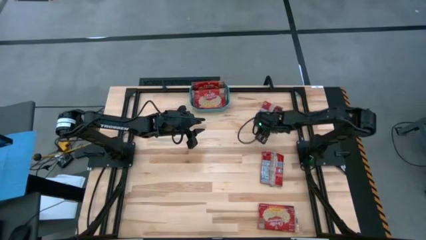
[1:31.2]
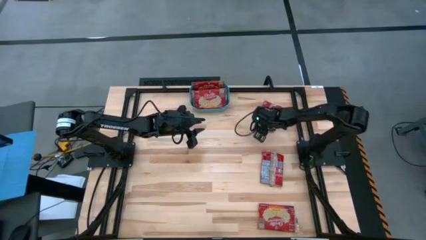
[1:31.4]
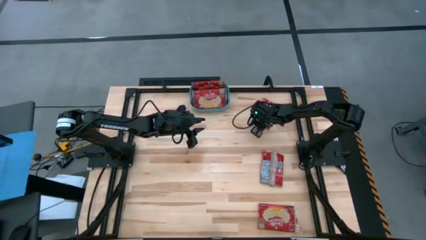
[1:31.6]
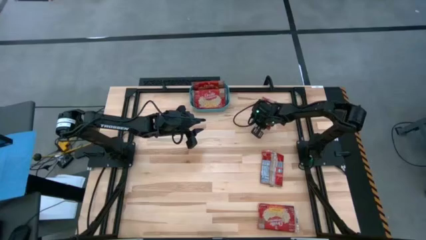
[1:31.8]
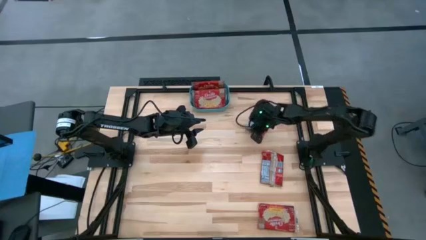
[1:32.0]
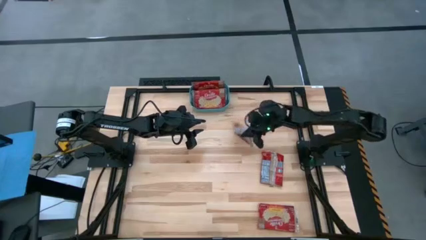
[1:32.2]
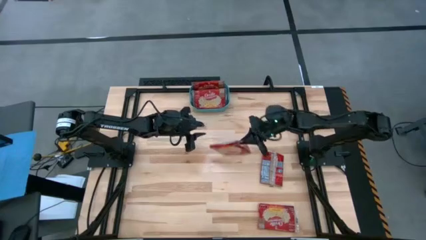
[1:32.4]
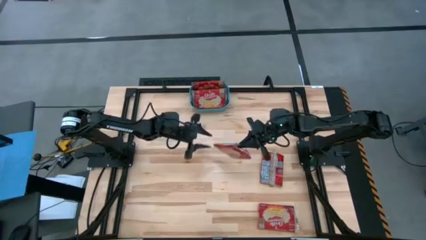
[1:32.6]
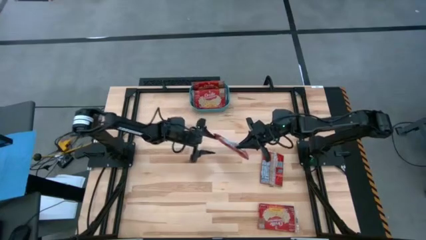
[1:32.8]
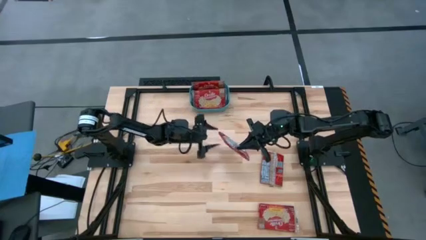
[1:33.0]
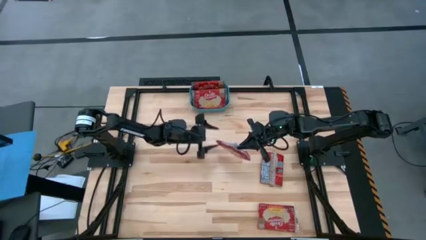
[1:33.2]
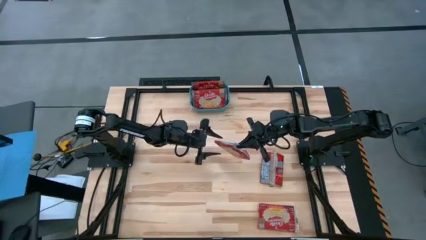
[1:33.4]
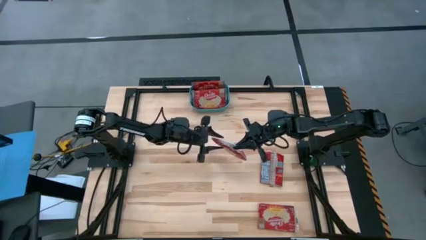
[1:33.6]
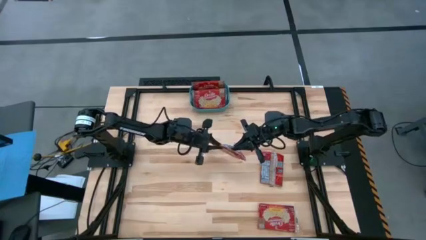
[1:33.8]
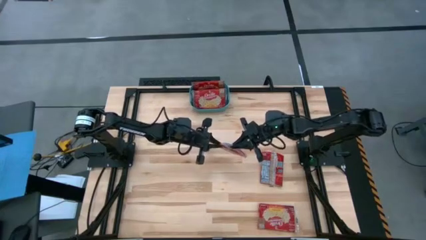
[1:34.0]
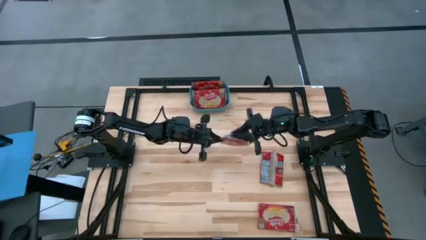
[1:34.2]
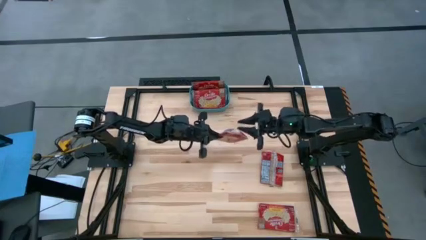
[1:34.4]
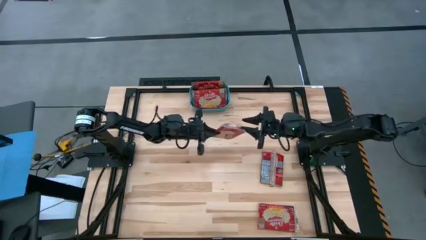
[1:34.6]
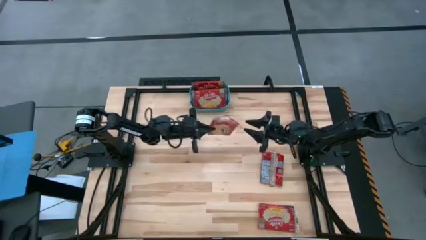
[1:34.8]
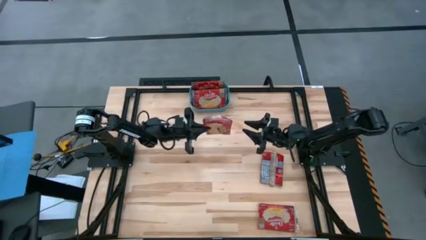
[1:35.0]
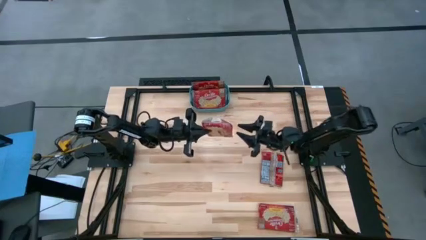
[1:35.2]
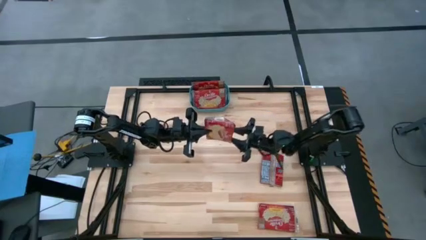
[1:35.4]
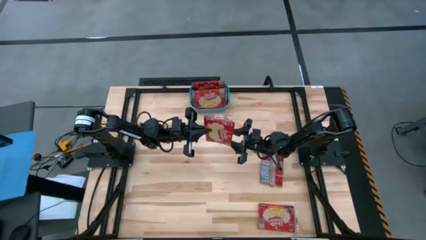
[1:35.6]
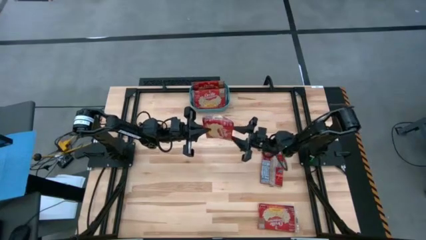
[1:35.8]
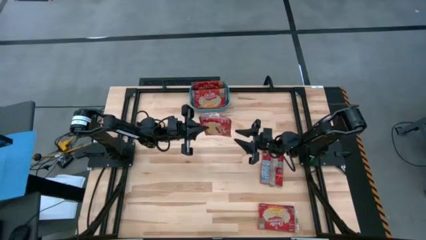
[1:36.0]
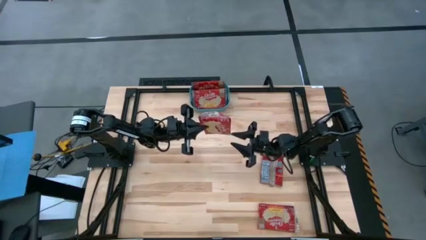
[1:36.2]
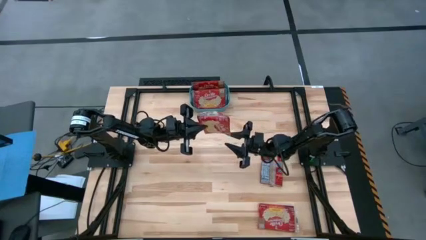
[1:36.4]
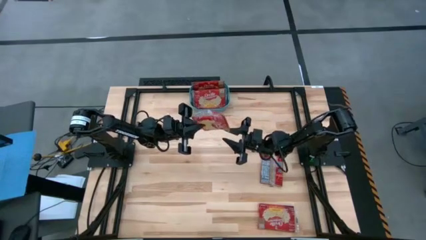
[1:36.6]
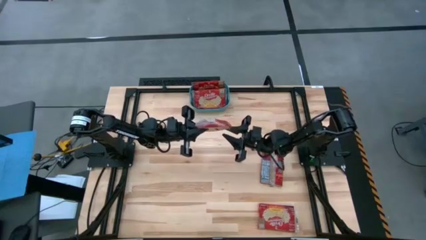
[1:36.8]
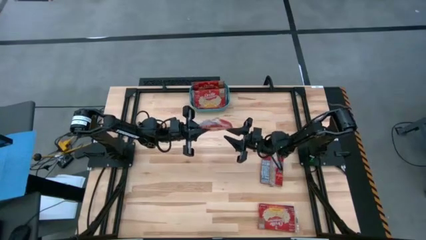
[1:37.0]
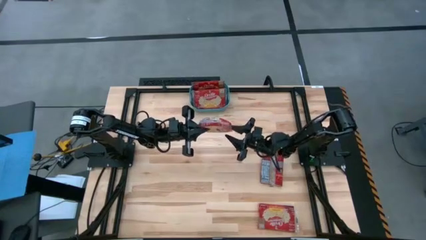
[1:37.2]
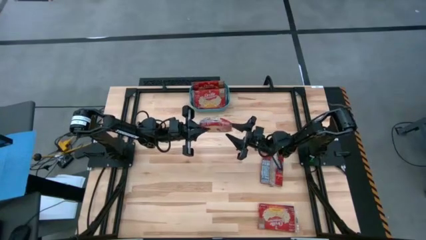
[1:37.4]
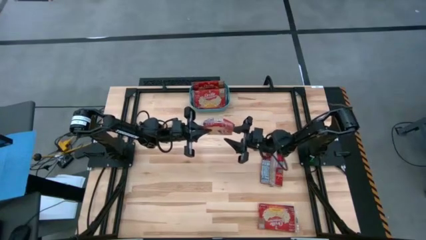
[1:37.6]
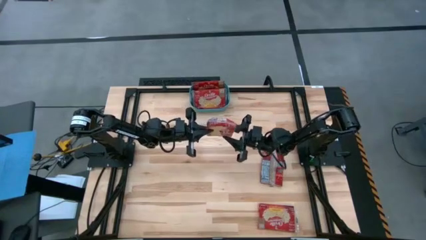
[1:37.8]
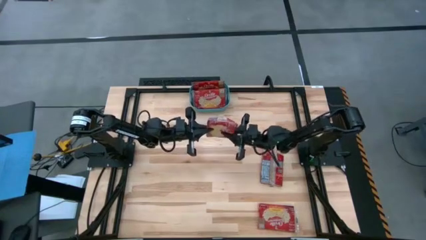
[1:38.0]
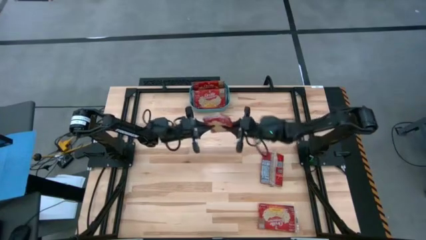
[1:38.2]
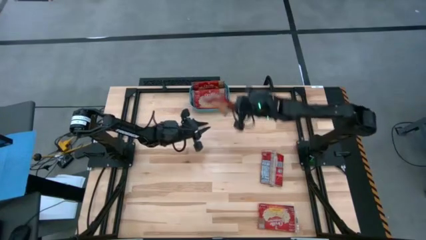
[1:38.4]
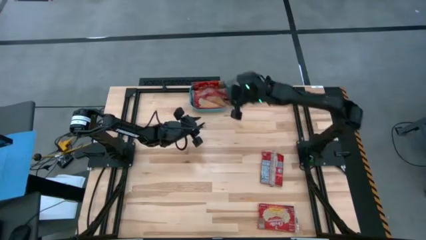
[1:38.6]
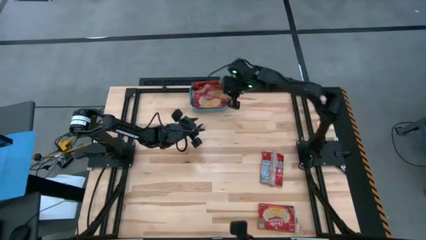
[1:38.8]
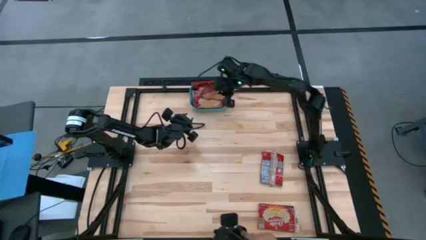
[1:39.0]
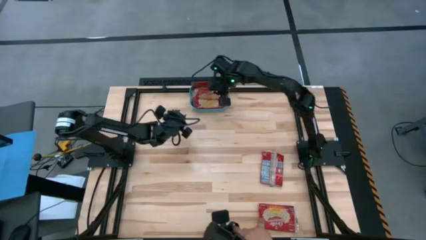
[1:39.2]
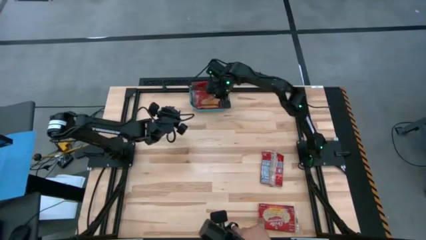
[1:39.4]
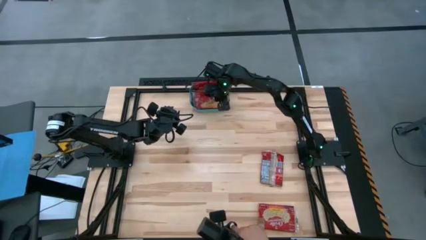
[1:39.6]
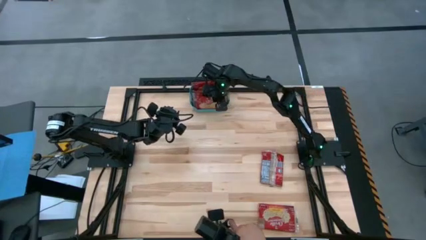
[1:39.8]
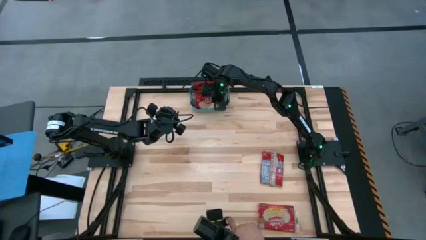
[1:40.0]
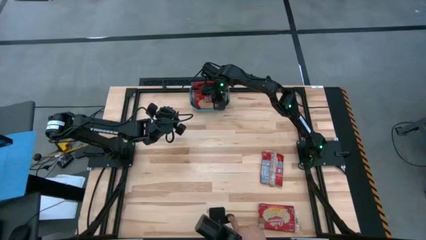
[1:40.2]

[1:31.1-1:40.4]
Task: Sort popcorn bags into baskets
Put the red popcorn bag into the green basket
